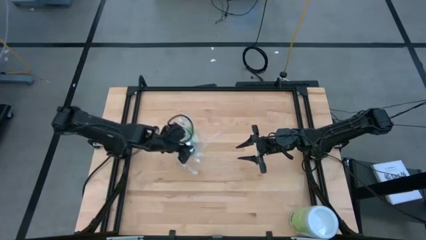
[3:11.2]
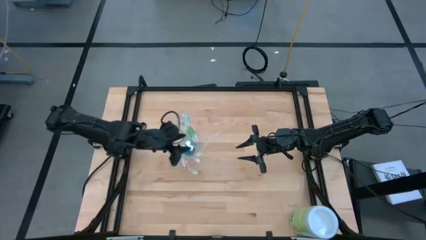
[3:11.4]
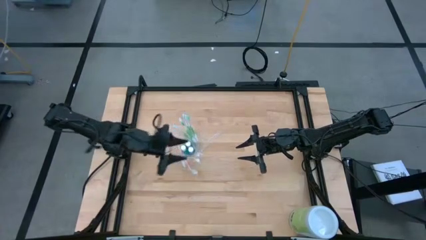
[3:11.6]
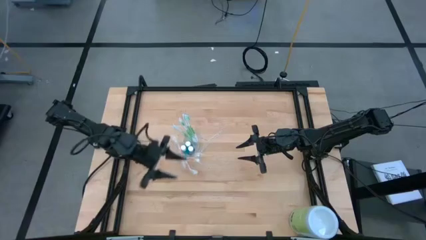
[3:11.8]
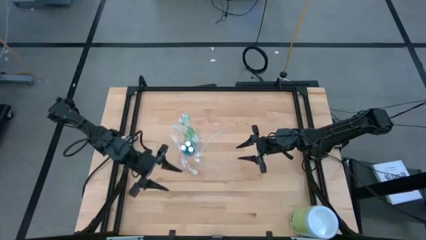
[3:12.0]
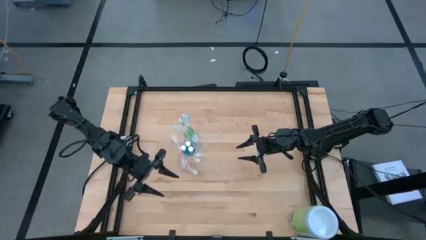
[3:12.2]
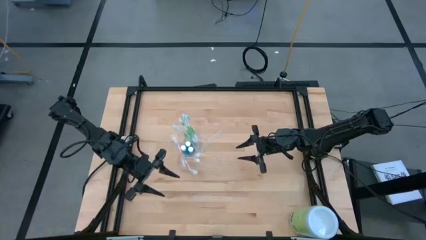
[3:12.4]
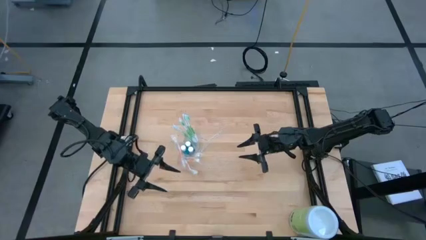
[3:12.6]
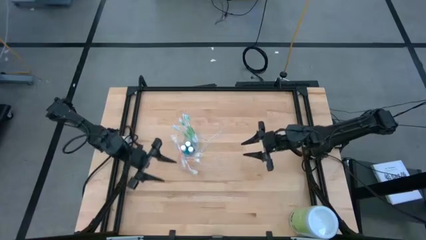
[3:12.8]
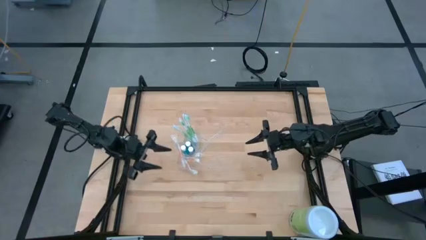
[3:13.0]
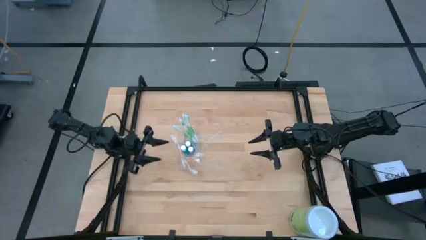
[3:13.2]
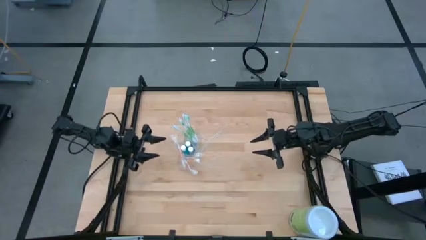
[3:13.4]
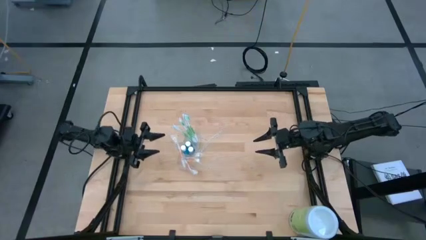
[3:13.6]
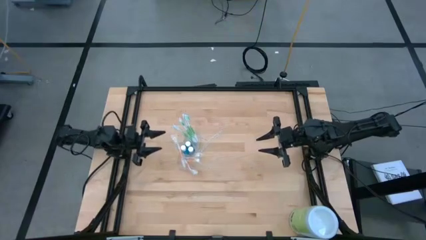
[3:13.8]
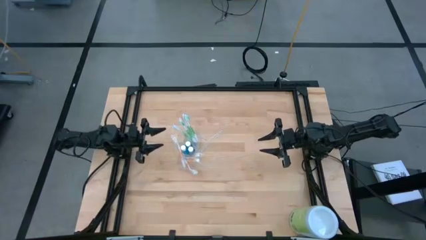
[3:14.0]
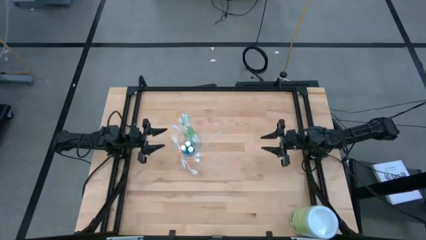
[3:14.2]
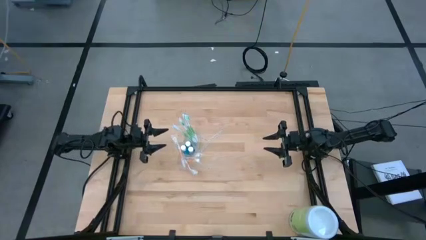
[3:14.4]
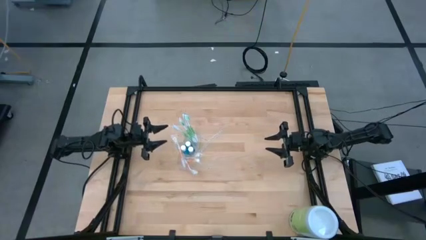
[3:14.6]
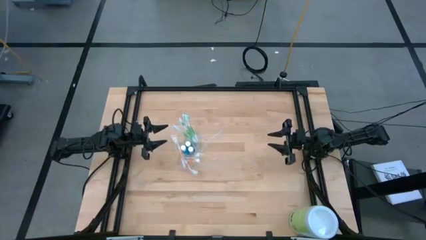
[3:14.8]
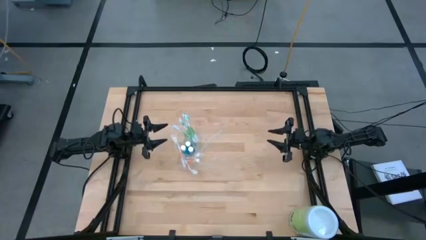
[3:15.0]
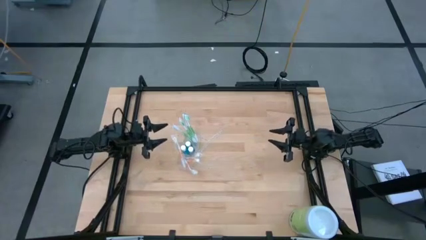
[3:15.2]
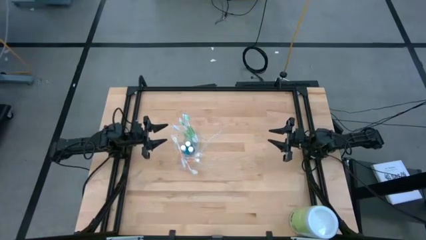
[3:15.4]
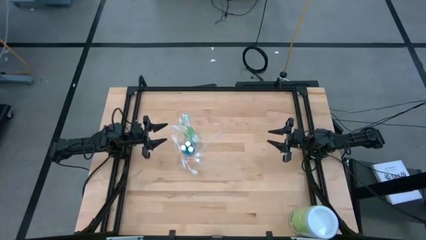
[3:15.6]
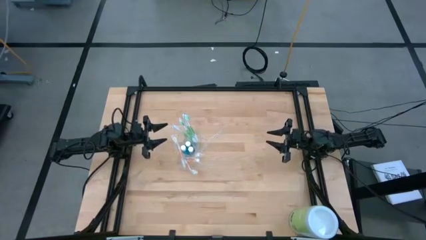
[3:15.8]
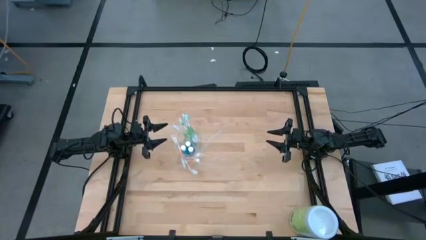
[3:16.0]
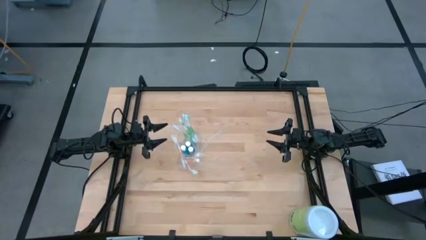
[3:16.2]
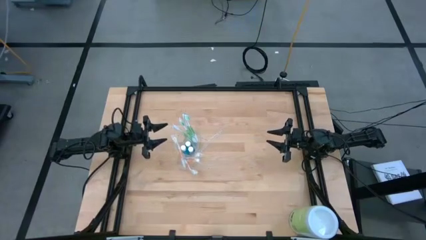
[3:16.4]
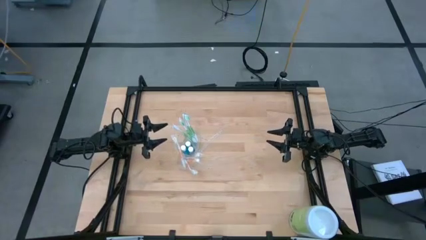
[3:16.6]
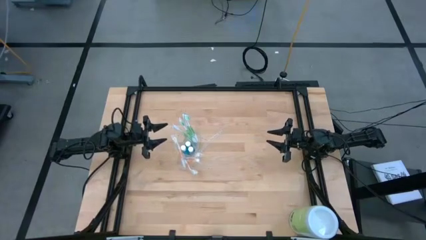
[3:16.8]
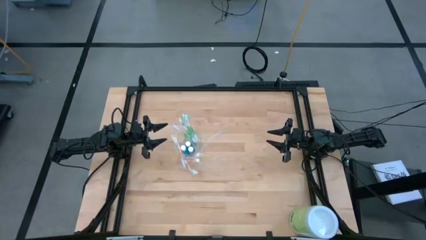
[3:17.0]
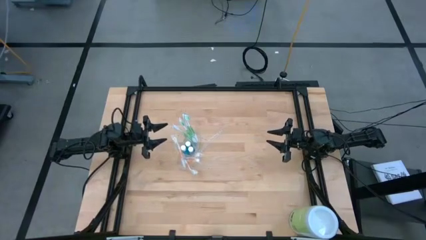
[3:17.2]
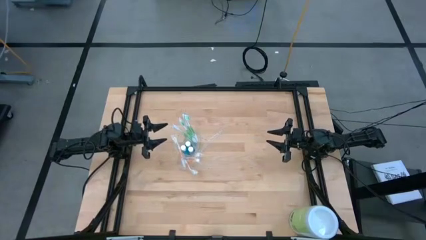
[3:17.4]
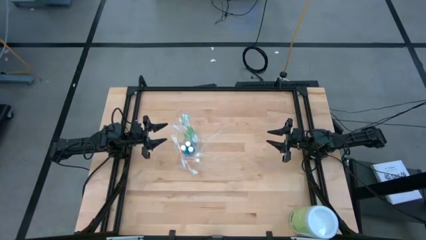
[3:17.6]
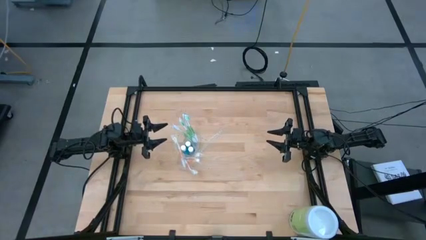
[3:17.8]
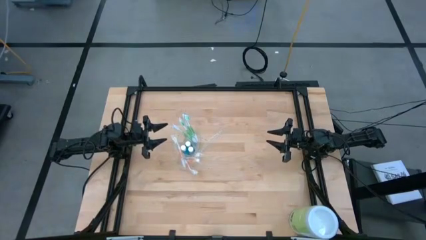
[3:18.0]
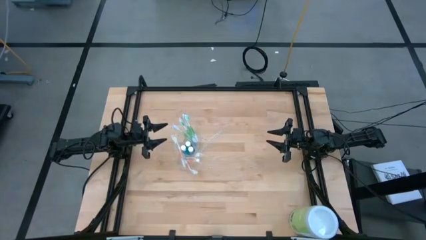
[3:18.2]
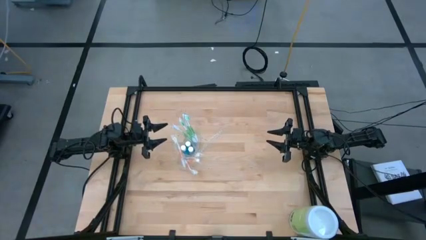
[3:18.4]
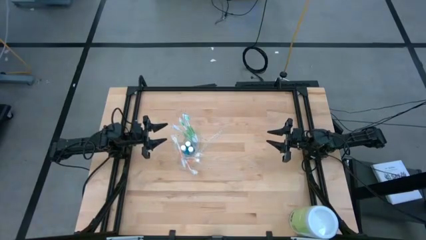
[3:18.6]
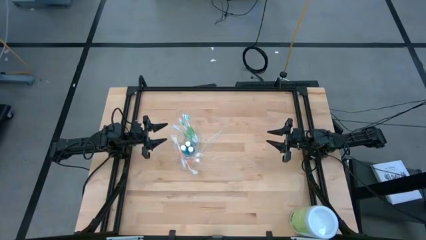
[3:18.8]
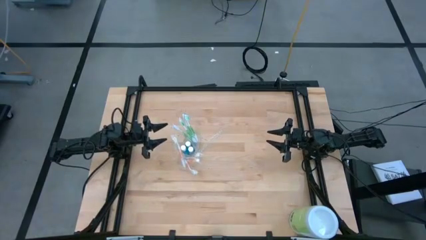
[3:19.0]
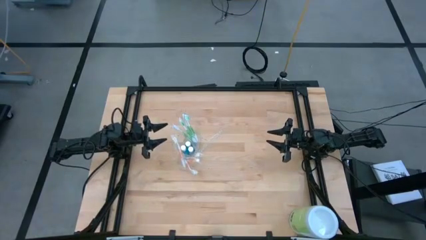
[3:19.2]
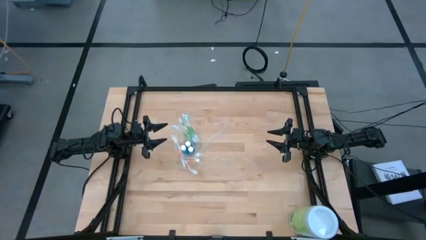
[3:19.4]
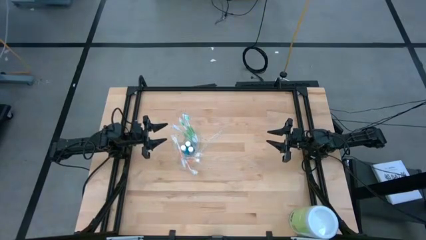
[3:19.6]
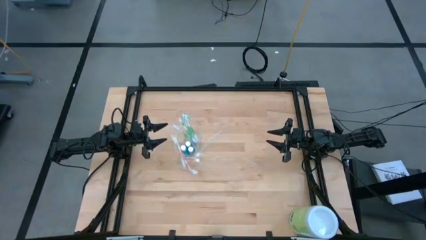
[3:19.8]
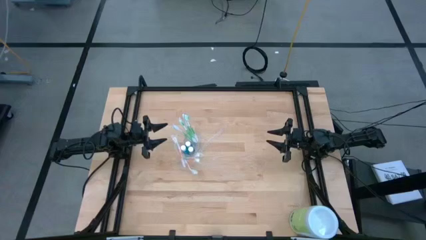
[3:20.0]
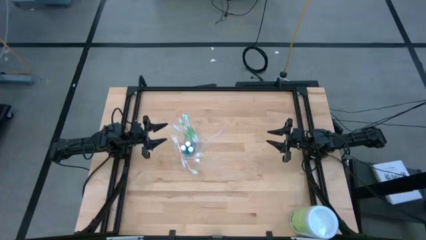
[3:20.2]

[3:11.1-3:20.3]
Task: Pick & Place toothbrushing station
Return to Home Position

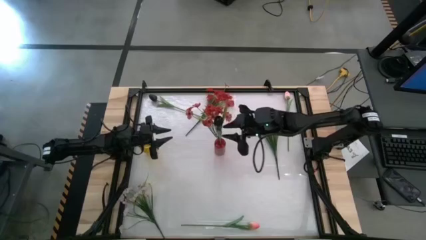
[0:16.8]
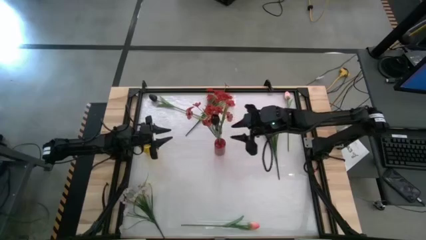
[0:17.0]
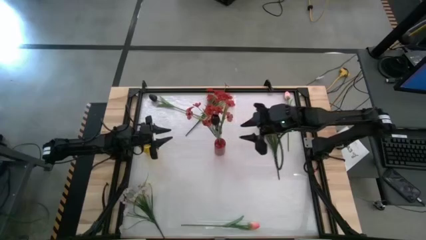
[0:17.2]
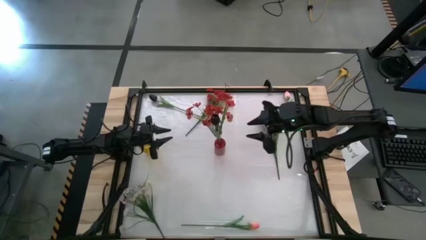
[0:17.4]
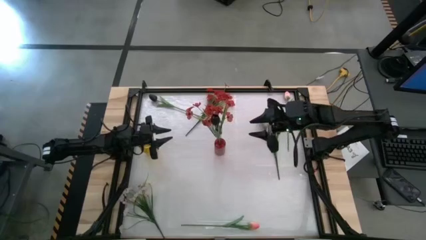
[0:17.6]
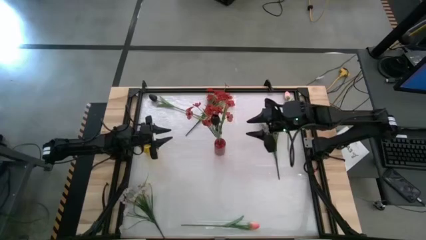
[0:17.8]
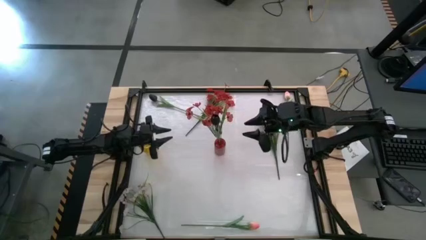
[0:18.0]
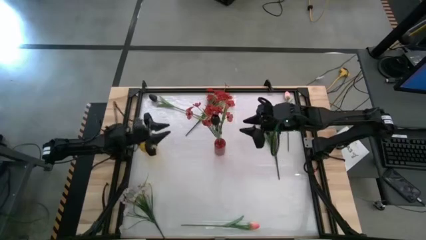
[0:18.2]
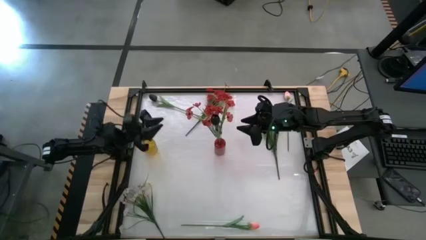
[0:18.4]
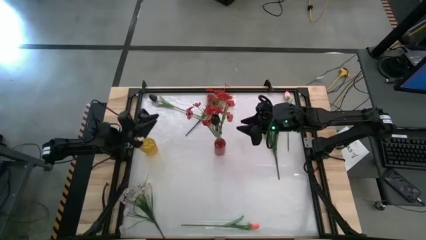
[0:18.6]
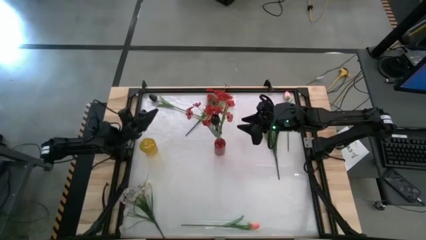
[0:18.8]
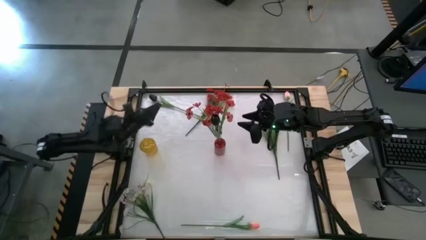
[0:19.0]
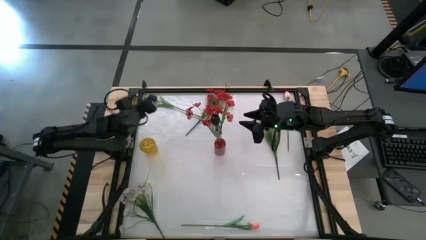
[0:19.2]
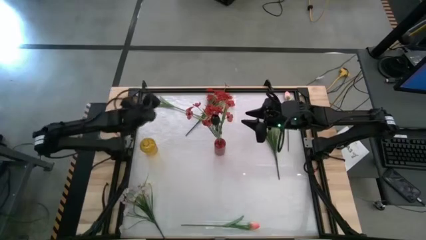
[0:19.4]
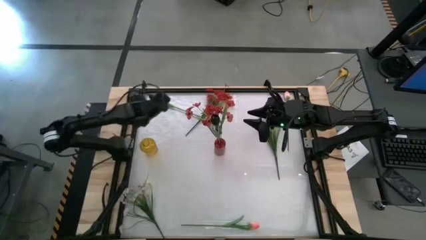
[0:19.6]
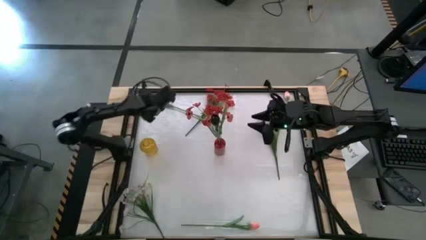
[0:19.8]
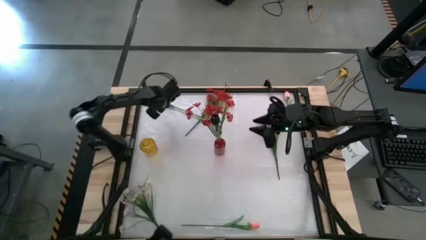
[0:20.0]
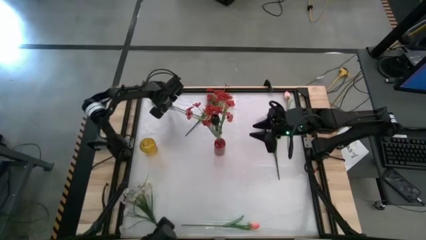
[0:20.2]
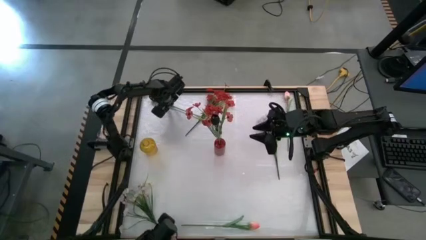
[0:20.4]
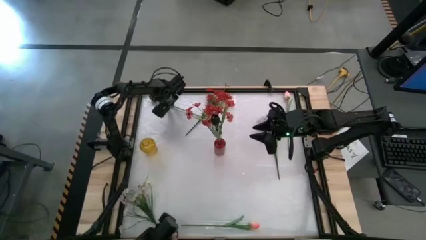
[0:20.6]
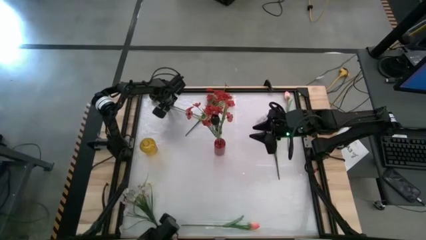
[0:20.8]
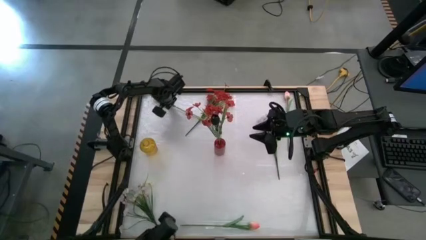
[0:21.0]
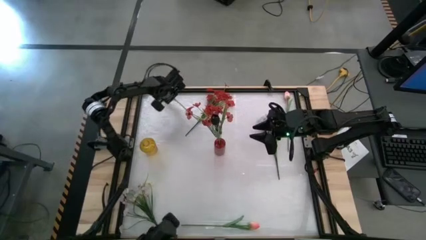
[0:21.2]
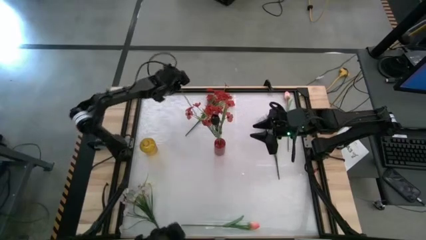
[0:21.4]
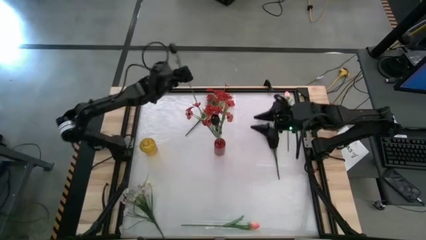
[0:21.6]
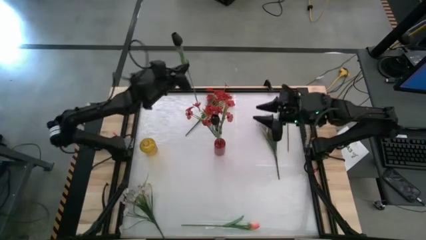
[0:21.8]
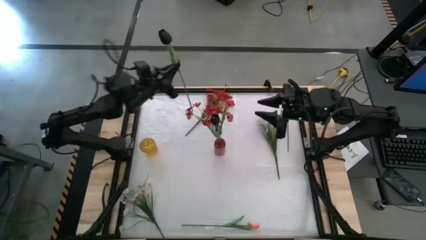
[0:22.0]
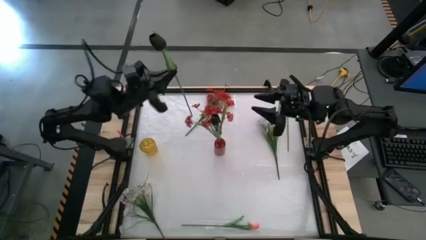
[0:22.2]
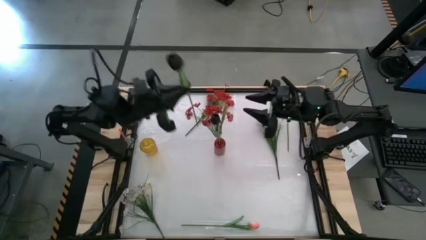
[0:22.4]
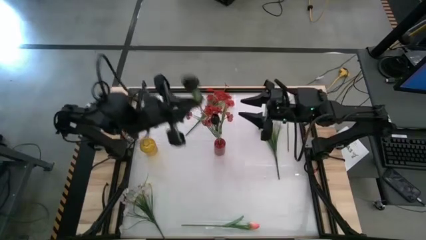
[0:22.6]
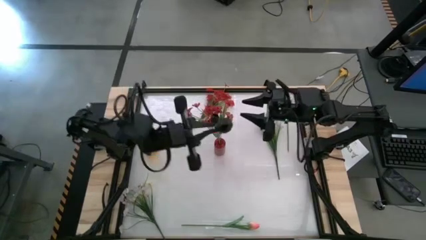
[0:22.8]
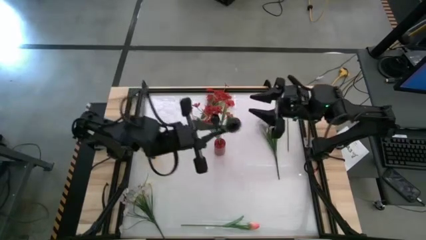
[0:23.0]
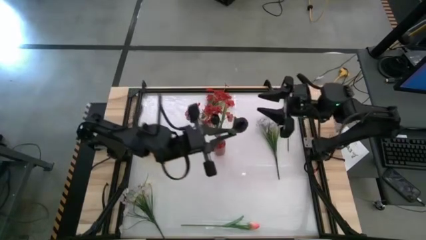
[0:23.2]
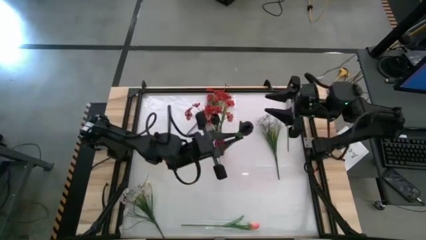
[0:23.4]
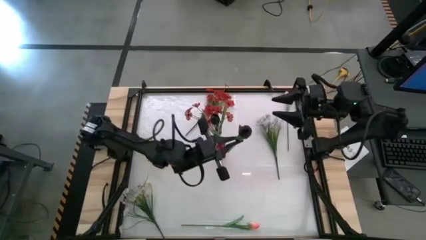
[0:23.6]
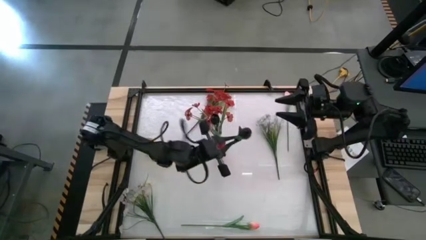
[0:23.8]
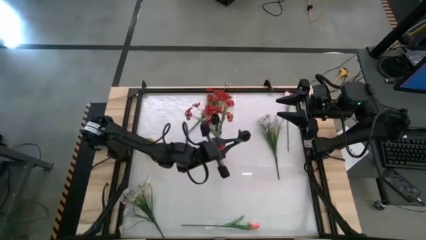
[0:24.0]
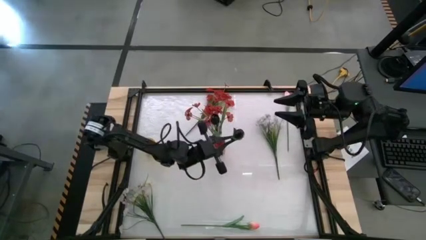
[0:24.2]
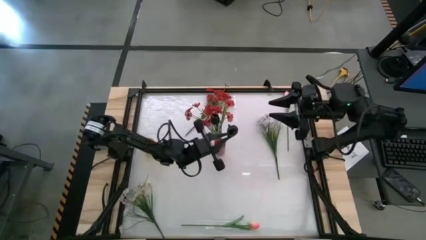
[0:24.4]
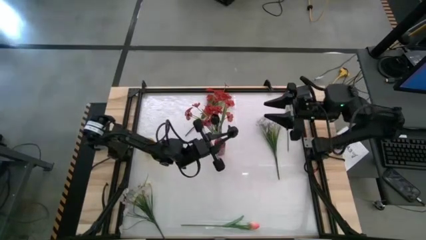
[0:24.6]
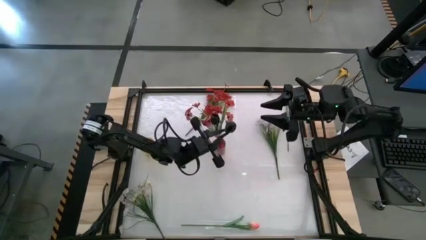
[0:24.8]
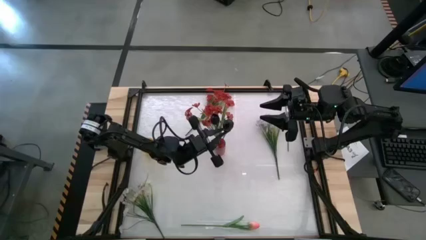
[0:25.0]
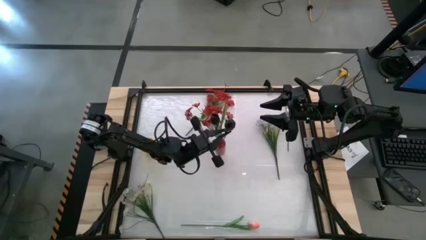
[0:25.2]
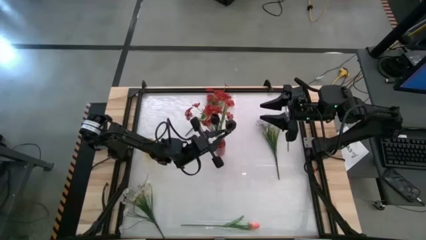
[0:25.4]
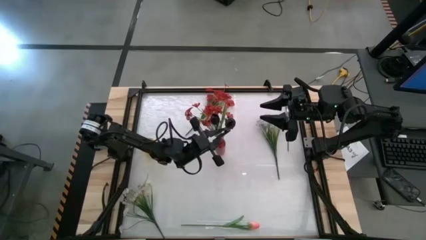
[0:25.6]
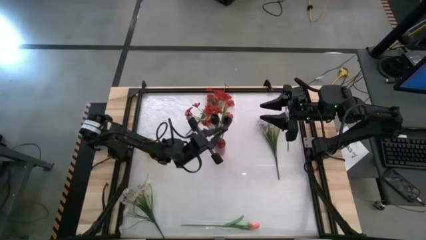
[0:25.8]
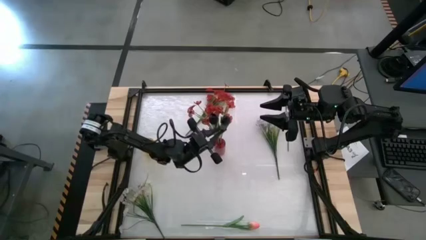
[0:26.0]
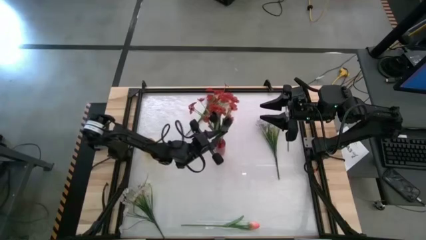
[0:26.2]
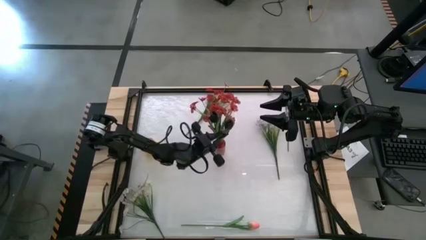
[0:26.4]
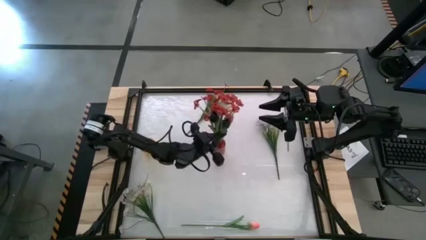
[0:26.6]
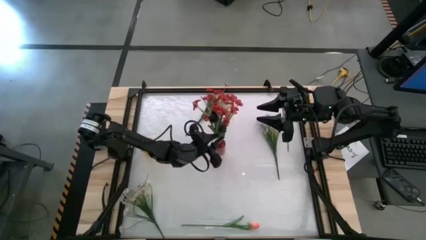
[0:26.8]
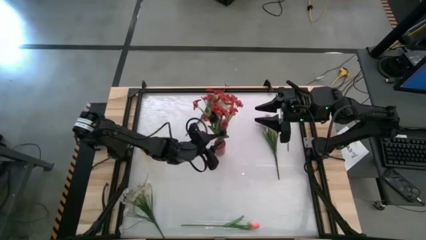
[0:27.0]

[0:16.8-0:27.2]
Task: Sort flowers into vase by color
Put the black flower into the red vase
